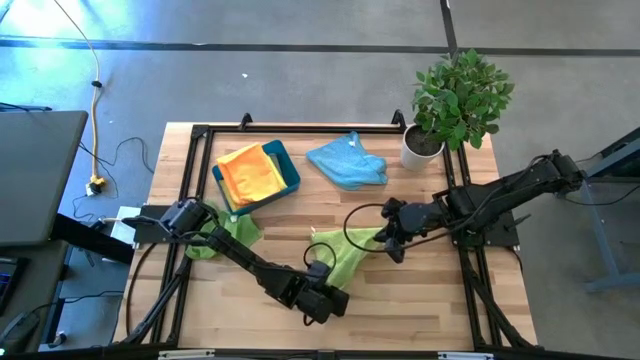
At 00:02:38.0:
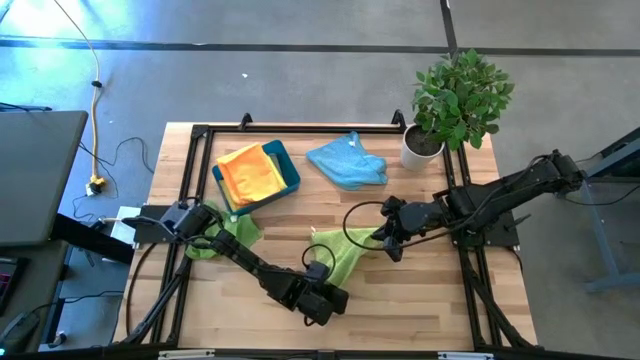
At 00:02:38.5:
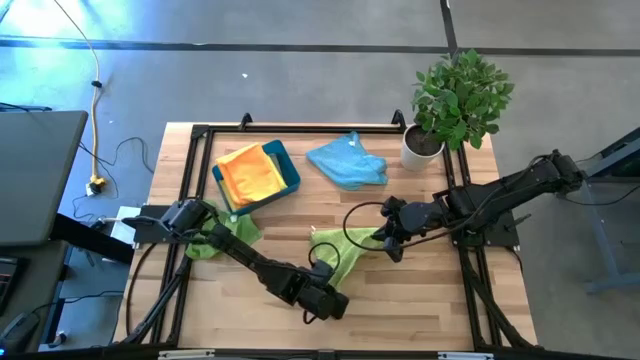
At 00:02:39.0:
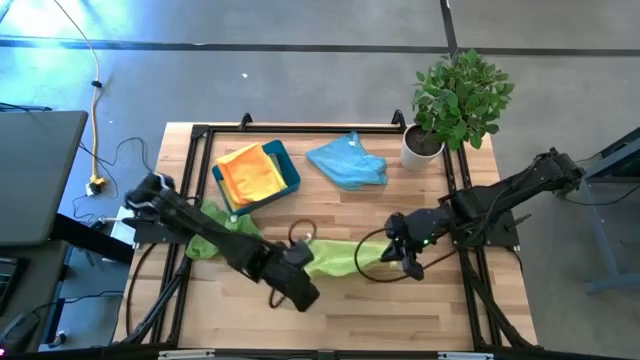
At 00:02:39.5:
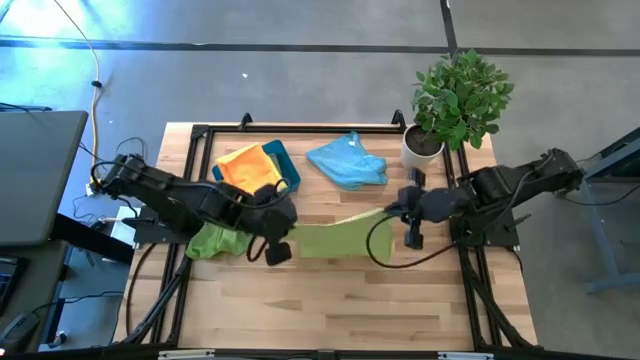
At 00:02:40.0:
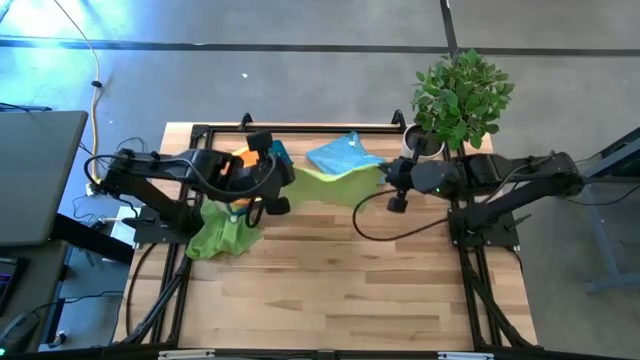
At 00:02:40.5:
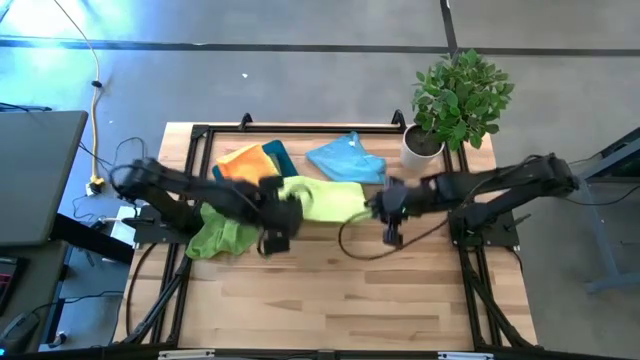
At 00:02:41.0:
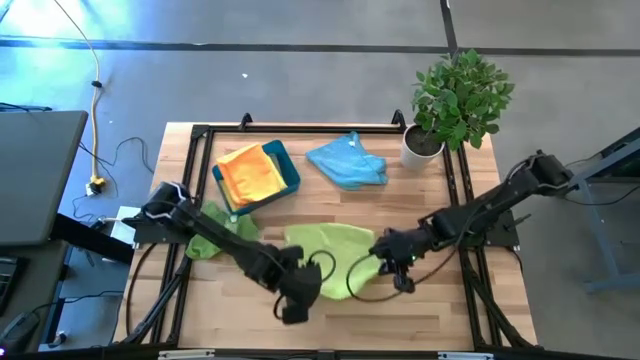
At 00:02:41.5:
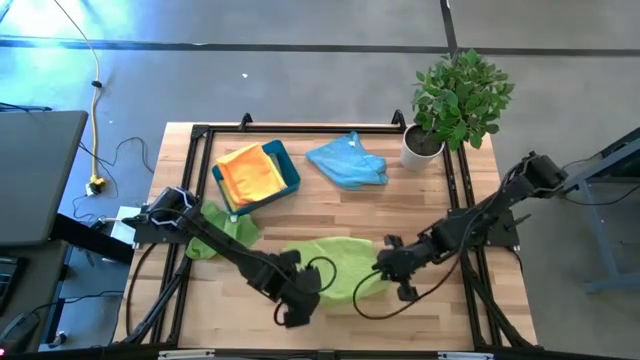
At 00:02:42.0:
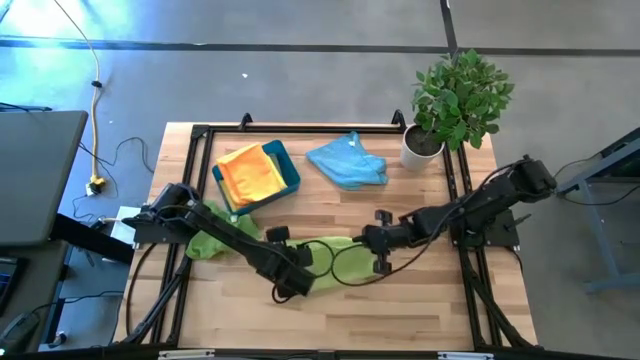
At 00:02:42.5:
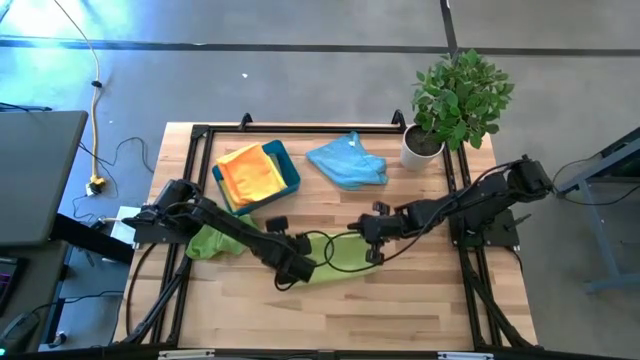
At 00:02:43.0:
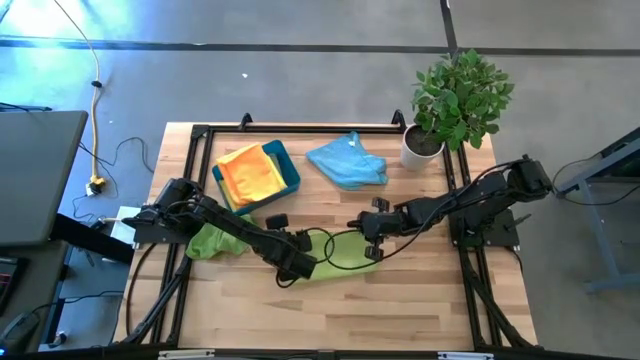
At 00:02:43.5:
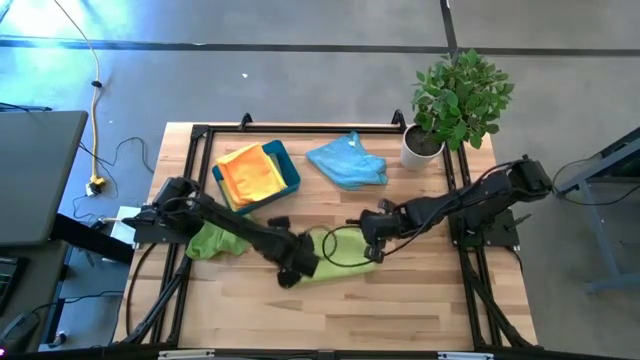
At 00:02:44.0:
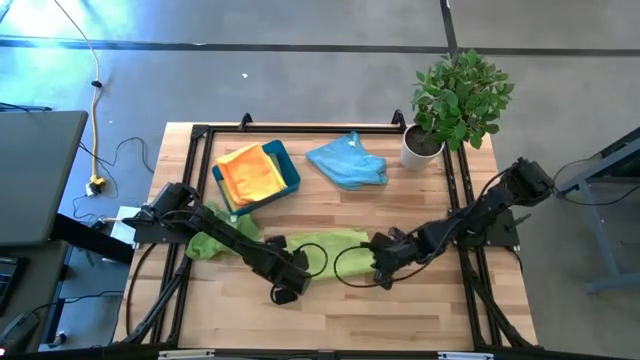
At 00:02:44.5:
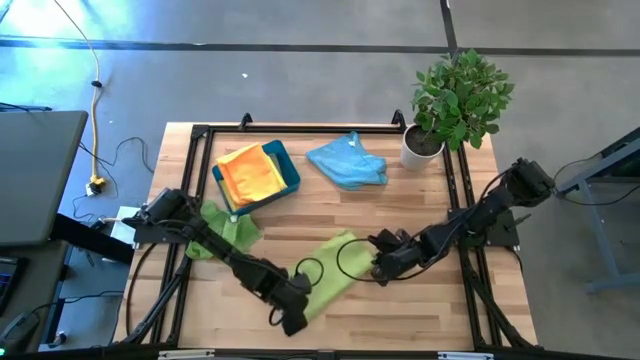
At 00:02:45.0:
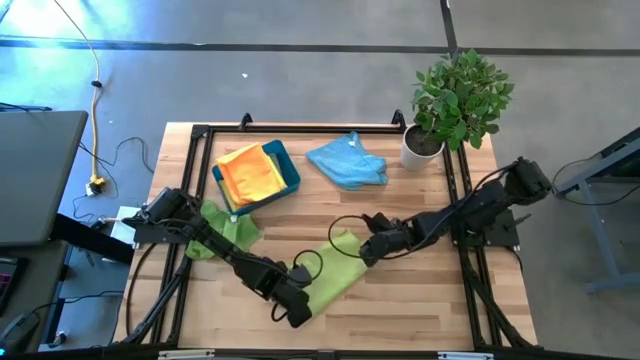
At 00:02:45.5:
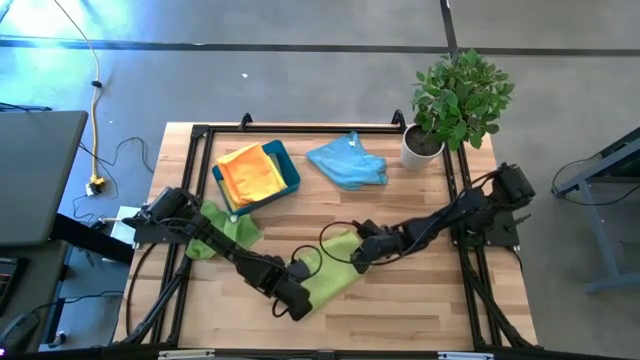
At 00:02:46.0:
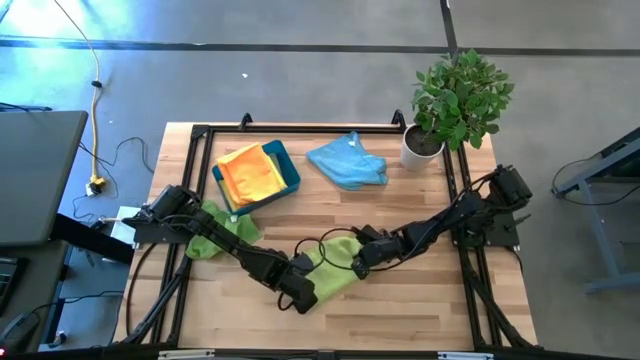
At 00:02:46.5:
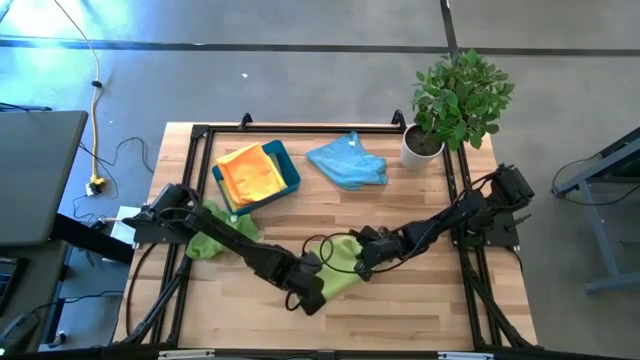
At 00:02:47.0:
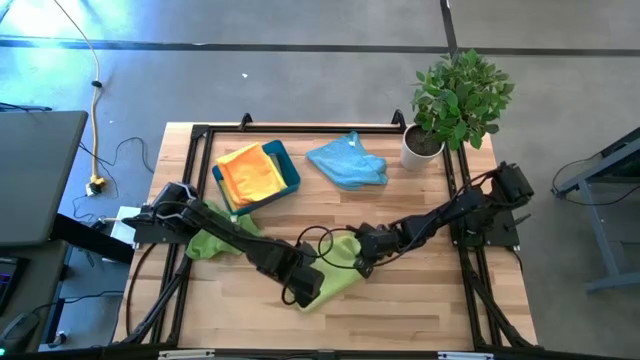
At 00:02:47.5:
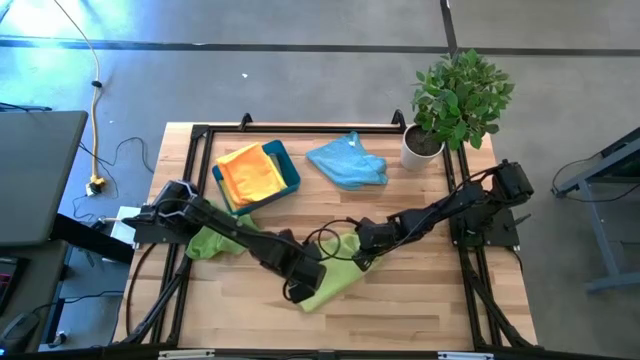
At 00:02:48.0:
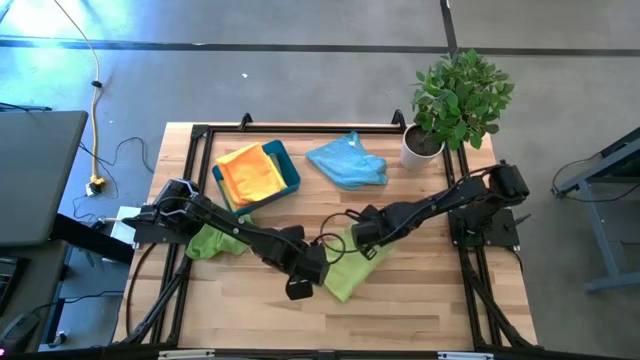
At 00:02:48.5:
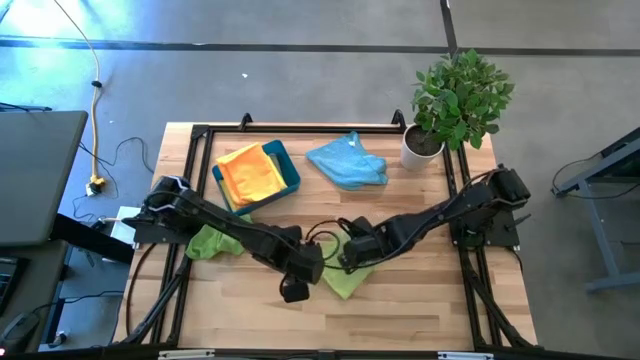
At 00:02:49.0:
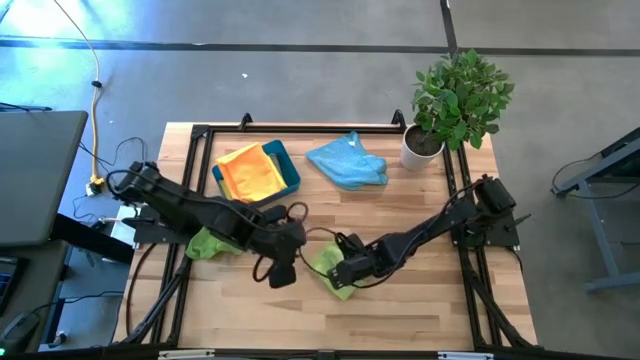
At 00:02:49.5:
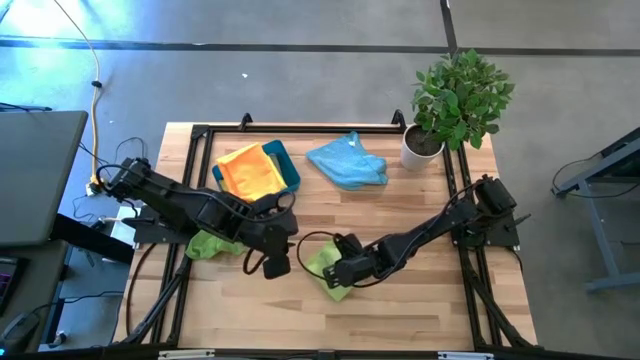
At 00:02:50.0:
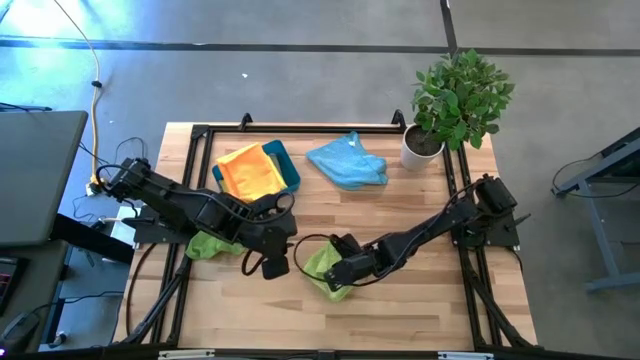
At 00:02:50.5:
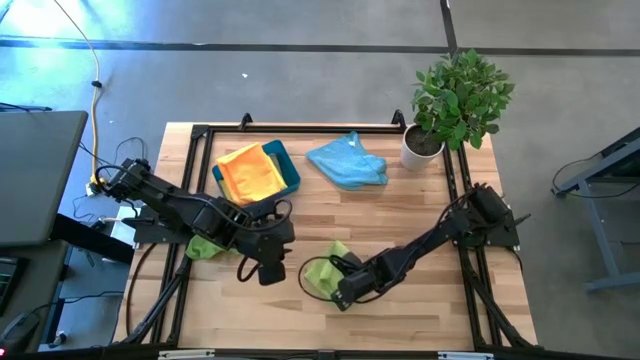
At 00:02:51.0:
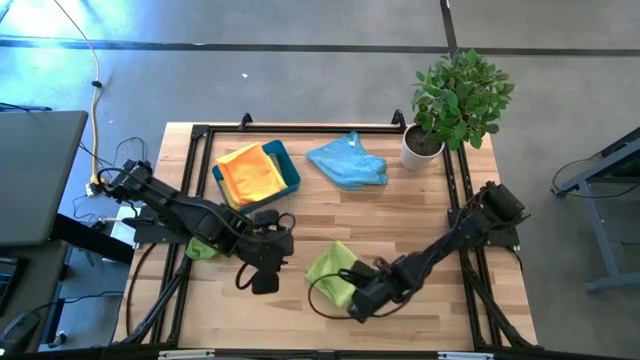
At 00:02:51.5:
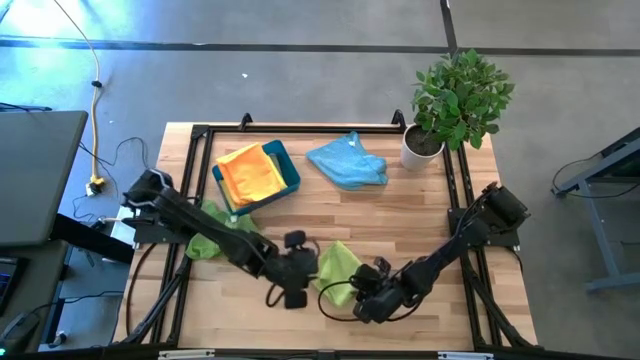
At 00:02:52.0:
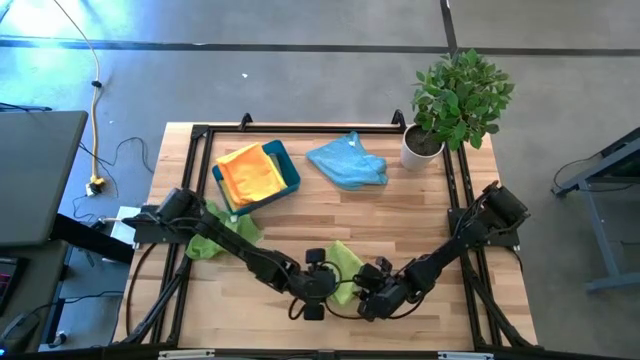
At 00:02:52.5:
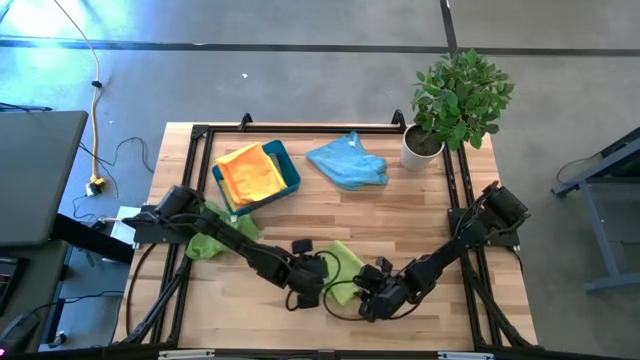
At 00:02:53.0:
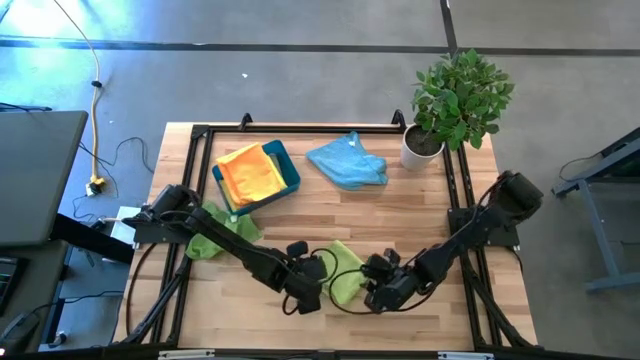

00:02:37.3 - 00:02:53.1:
Task: Fold microfiber towels
Fold the right green microfiber cloth

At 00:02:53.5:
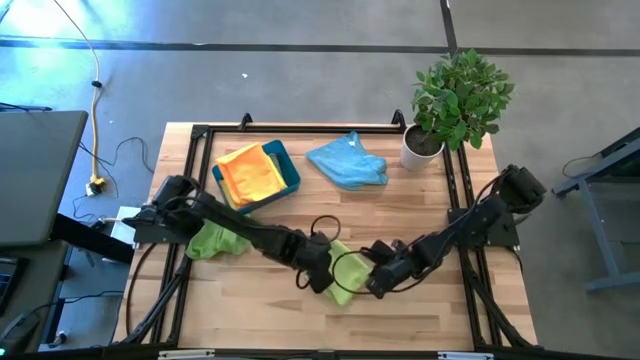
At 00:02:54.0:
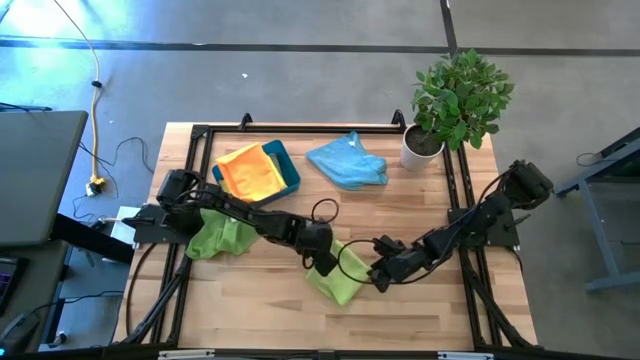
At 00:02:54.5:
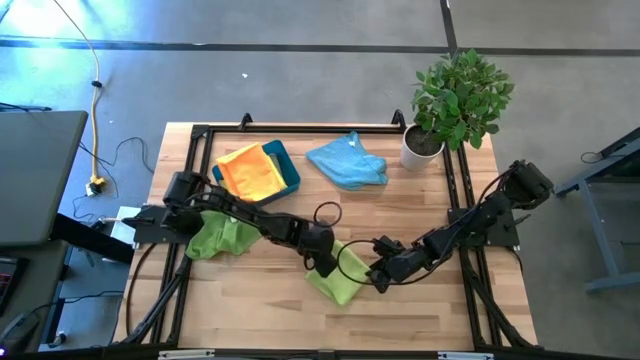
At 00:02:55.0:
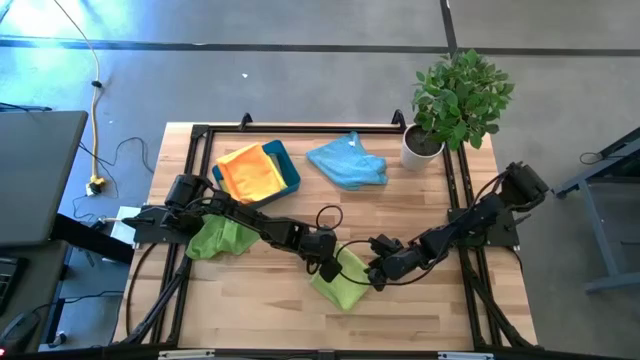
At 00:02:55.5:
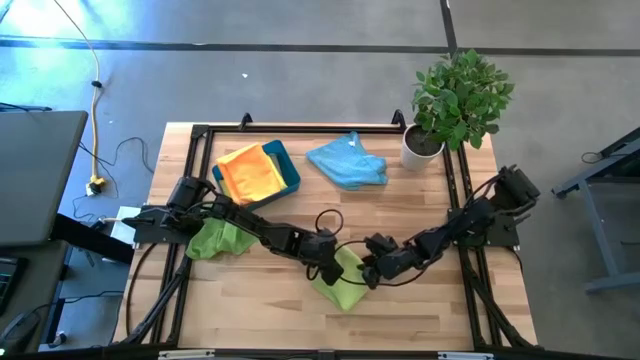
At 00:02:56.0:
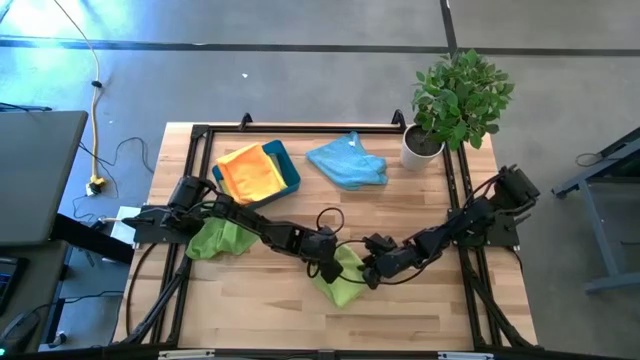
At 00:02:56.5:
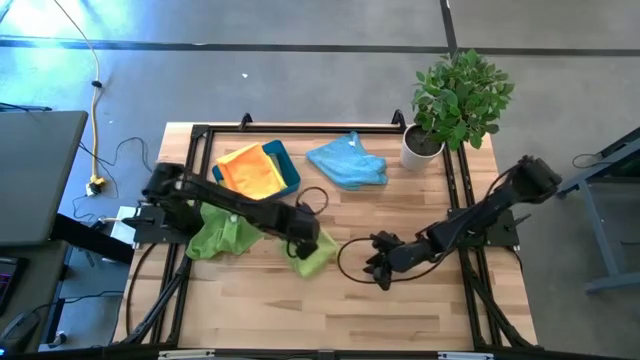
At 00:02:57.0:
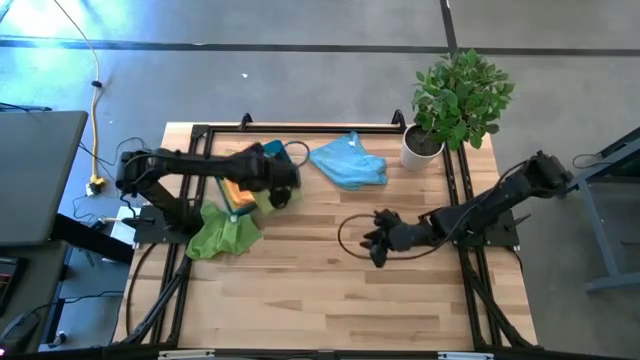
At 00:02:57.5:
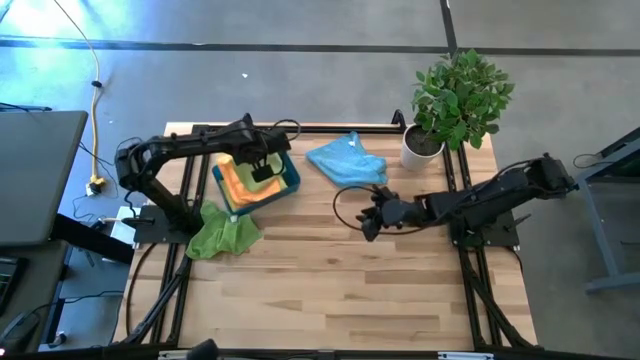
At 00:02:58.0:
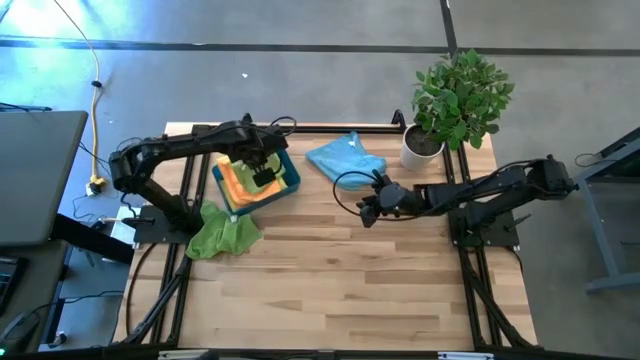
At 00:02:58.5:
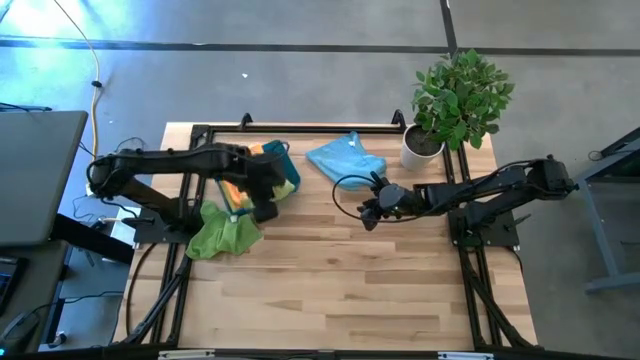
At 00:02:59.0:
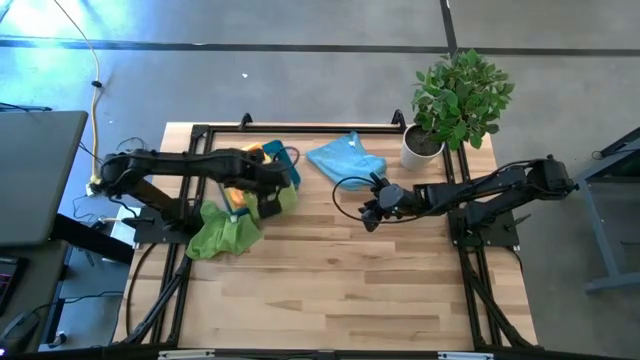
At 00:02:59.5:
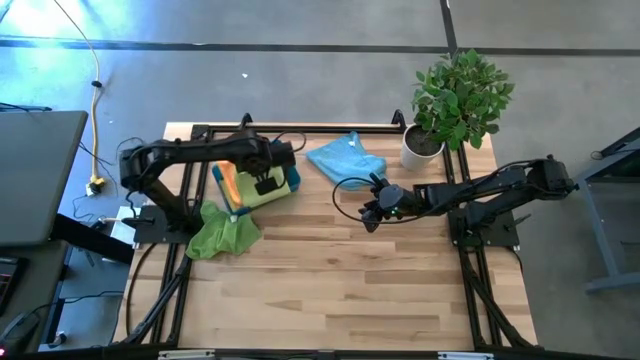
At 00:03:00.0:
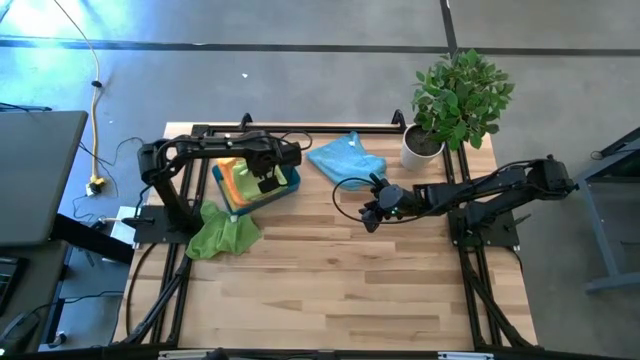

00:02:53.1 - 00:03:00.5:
Put the right folded green microfiber cloth into the bin
